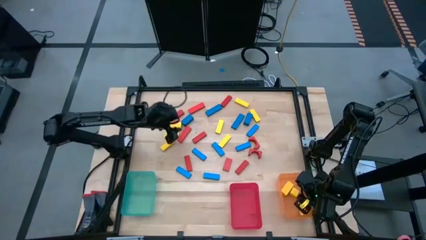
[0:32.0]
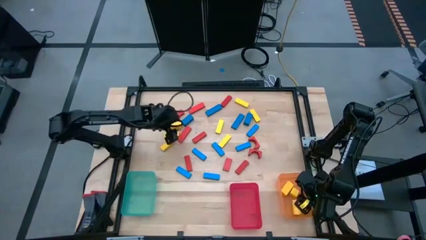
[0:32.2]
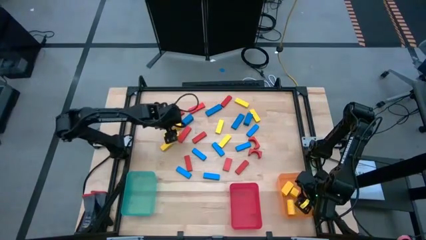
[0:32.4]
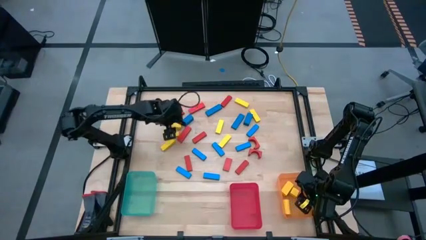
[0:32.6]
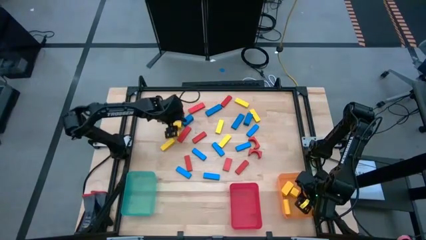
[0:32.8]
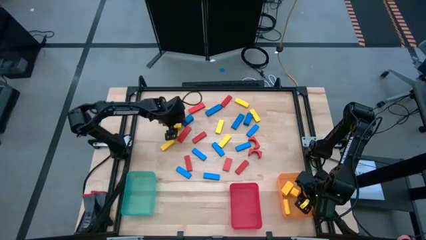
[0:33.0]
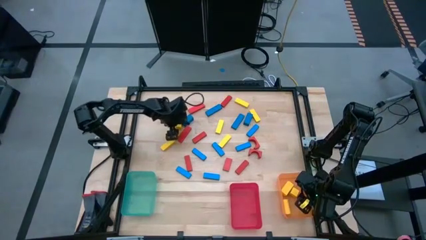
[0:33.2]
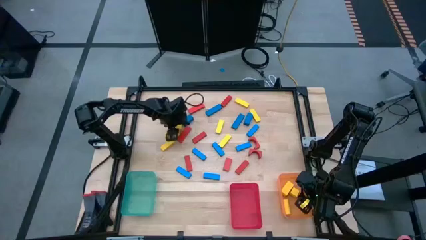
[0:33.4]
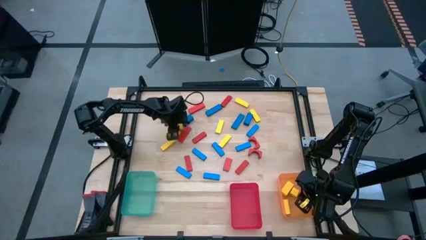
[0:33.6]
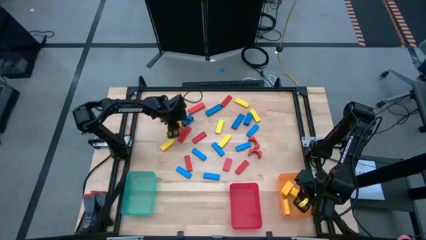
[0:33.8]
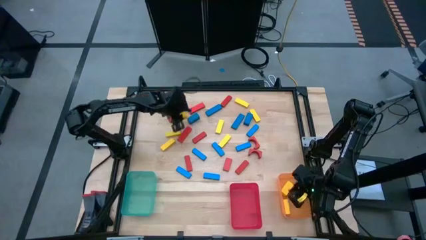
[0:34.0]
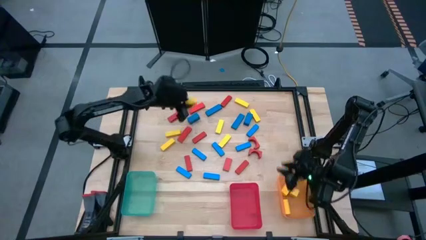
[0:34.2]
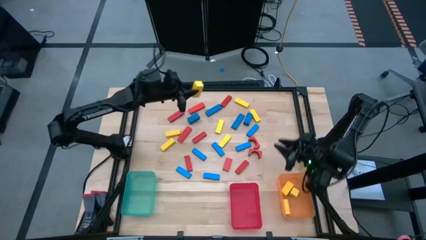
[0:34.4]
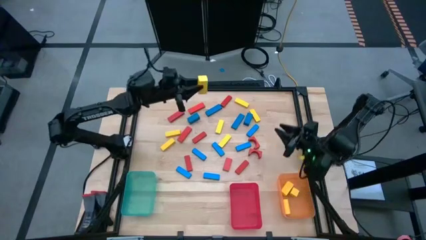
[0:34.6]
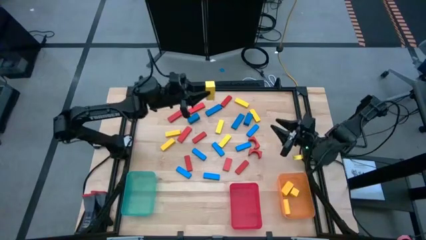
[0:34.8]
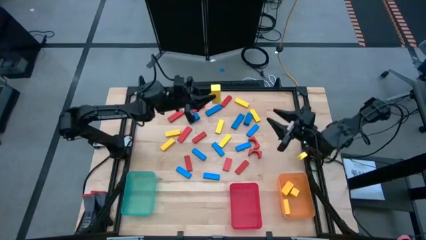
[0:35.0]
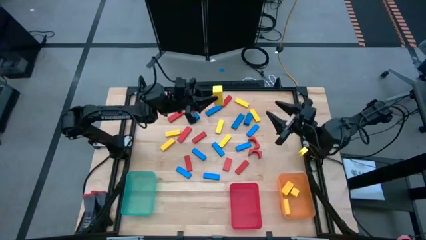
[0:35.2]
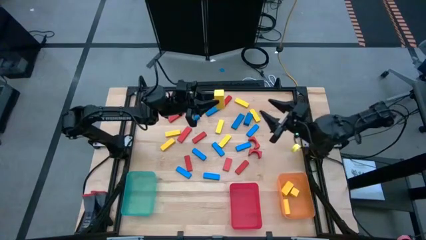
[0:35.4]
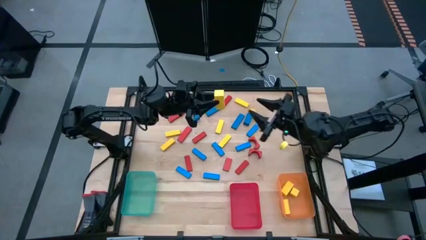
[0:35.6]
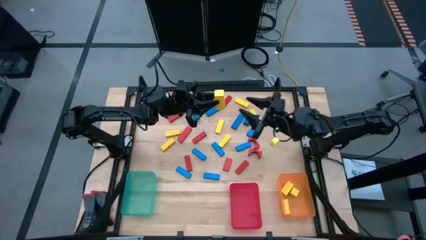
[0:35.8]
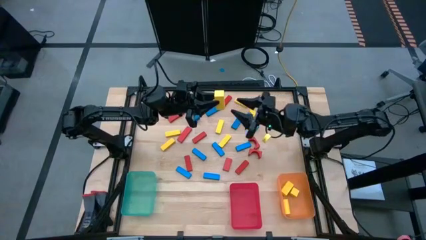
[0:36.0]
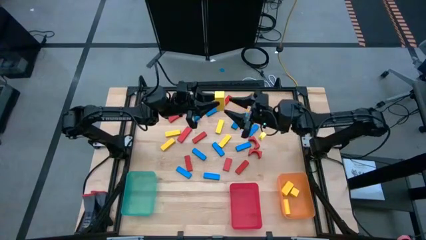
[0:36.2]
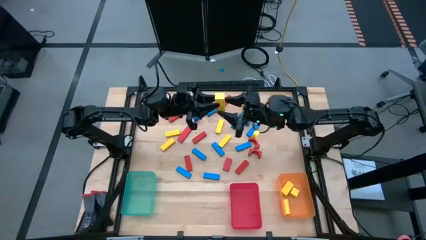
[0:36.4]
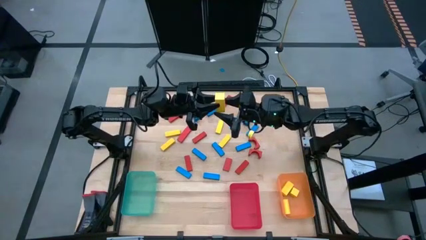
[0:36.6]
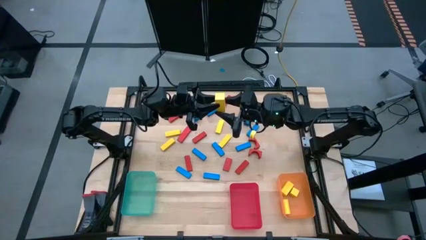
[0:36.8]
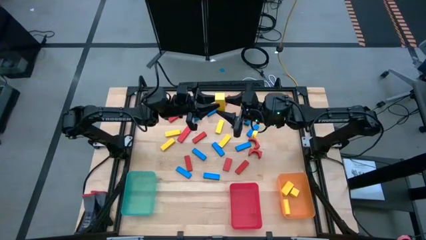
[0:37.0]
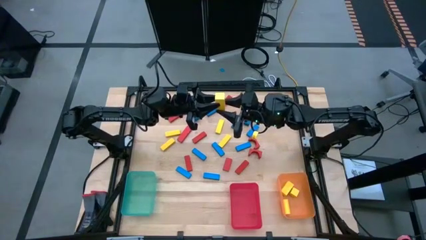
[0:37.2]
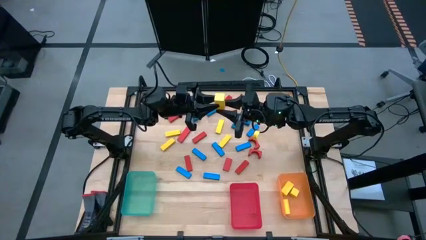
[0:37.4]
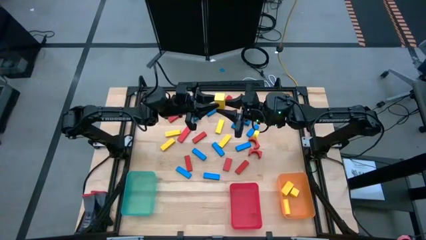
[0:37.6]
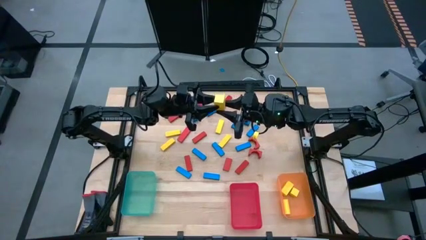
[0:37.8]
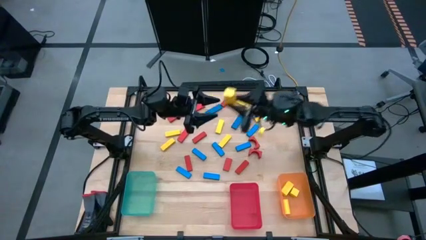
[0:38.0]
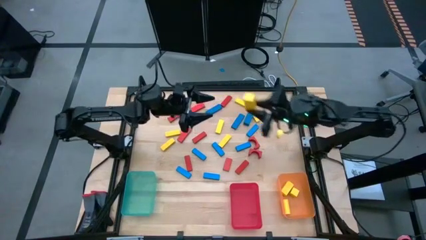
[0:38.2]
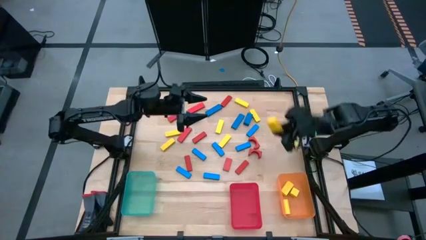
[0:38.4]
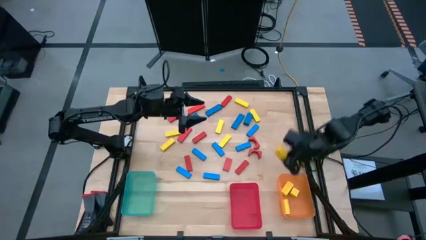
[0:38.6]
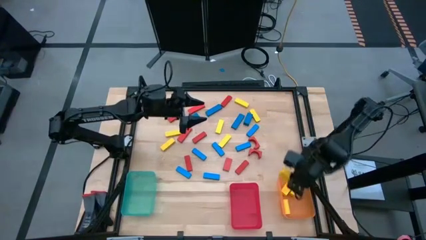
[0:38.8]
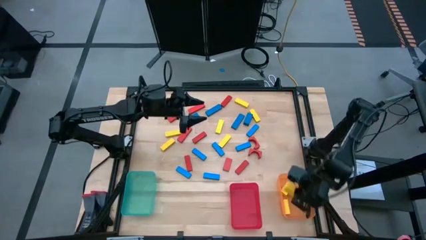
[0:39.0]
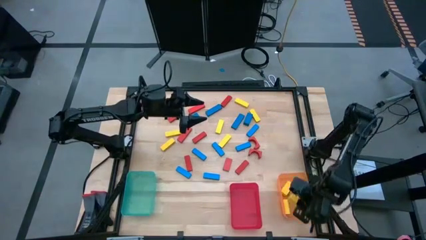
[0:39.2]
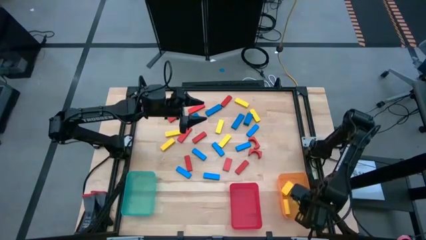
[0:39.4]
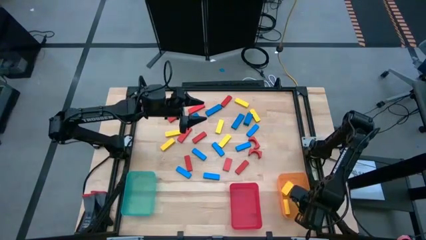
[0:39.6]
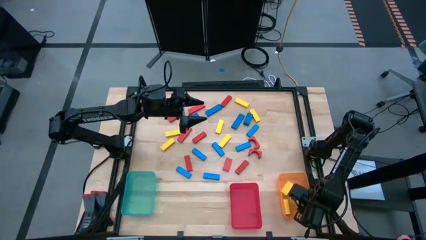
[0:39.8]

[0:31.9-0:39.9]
Task: Sort blocks
Put the yellow block into the orange bin

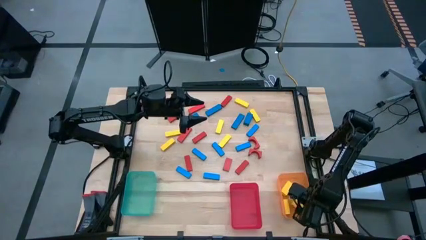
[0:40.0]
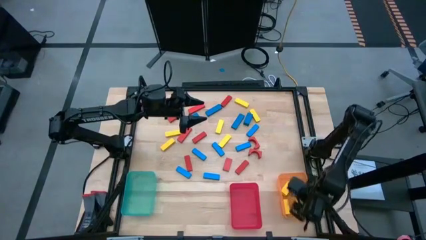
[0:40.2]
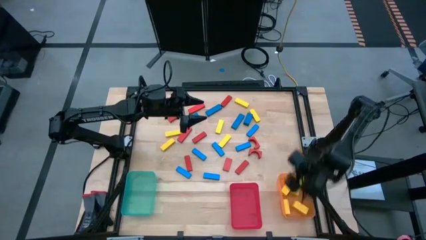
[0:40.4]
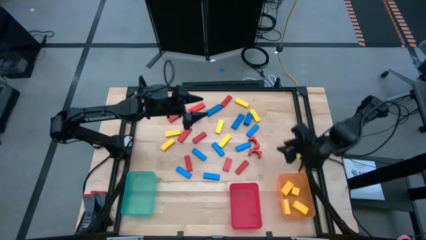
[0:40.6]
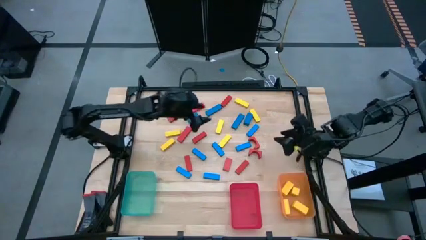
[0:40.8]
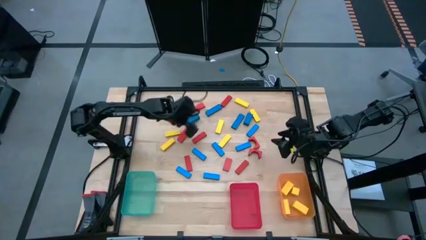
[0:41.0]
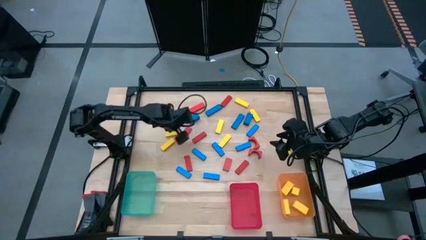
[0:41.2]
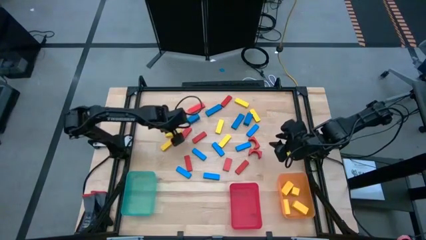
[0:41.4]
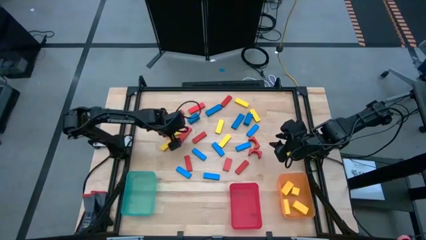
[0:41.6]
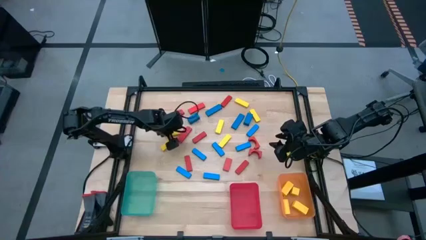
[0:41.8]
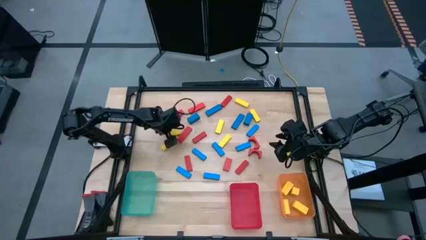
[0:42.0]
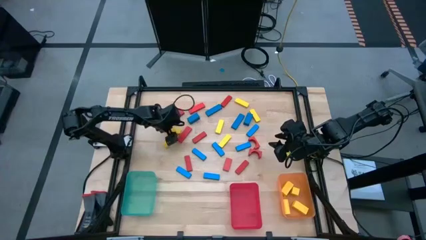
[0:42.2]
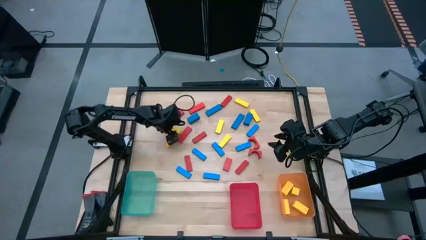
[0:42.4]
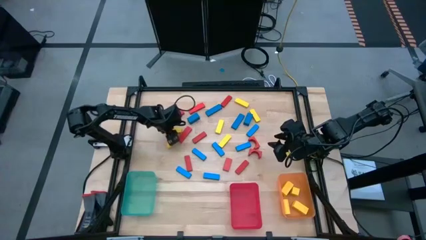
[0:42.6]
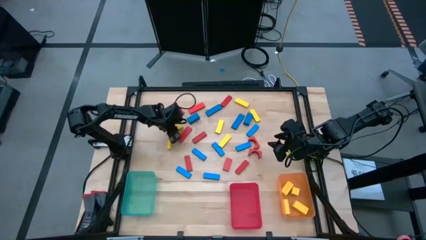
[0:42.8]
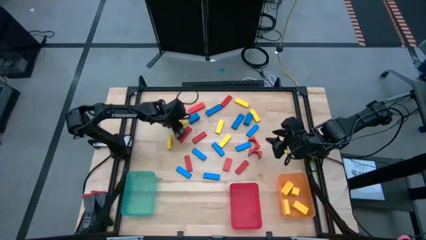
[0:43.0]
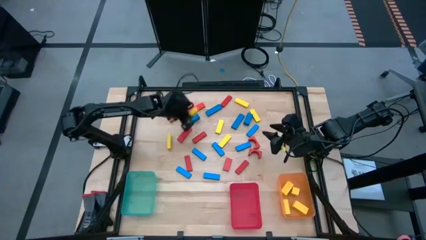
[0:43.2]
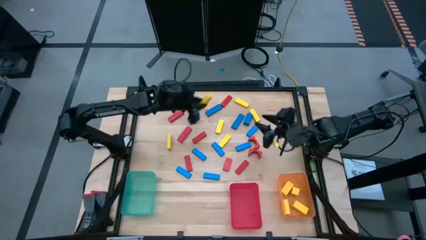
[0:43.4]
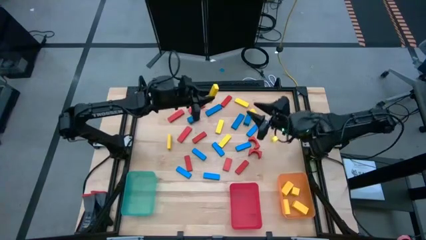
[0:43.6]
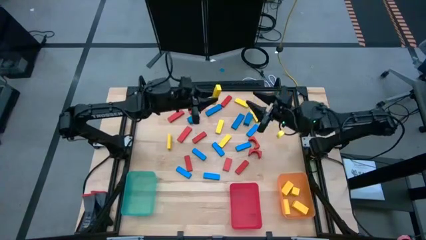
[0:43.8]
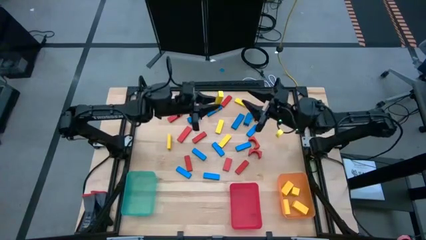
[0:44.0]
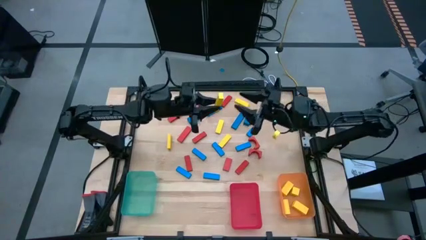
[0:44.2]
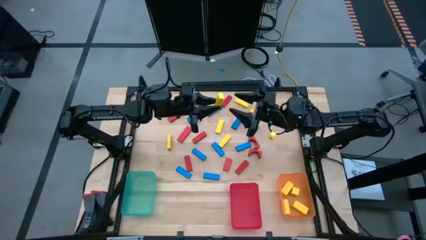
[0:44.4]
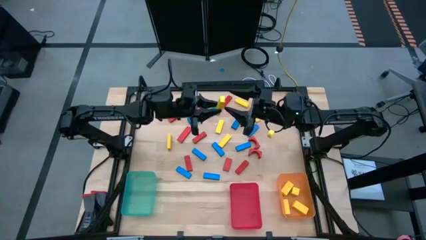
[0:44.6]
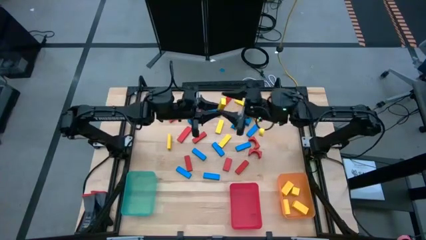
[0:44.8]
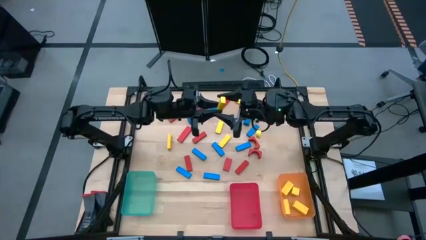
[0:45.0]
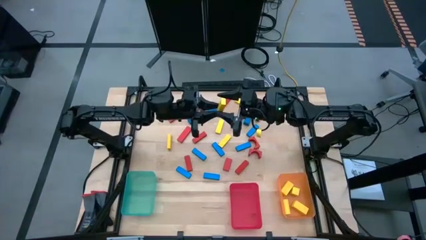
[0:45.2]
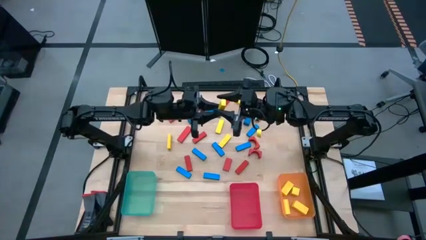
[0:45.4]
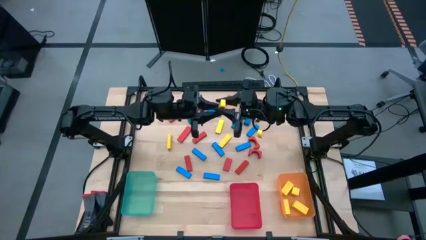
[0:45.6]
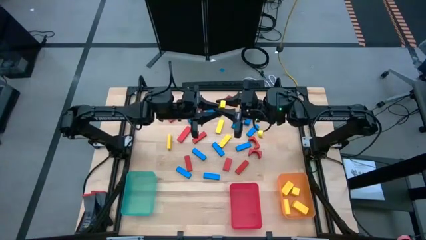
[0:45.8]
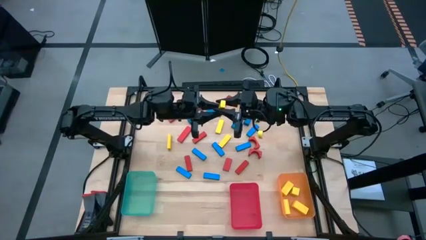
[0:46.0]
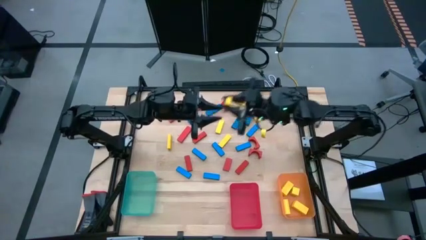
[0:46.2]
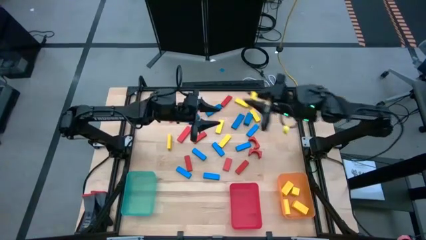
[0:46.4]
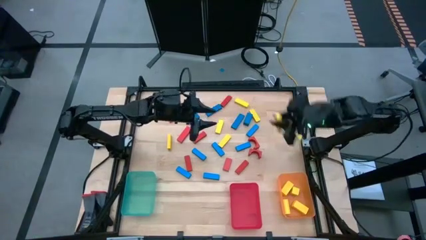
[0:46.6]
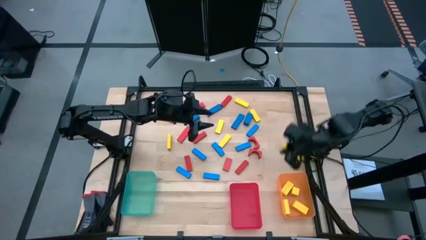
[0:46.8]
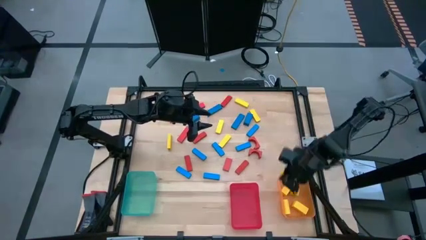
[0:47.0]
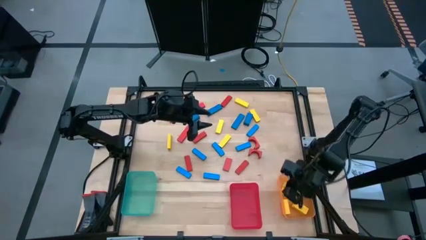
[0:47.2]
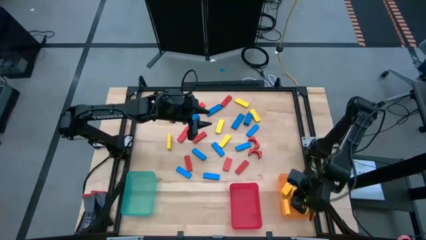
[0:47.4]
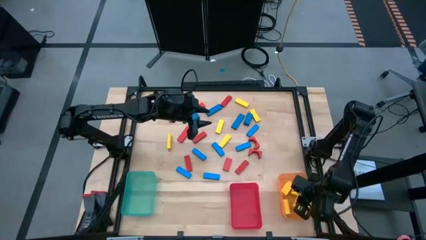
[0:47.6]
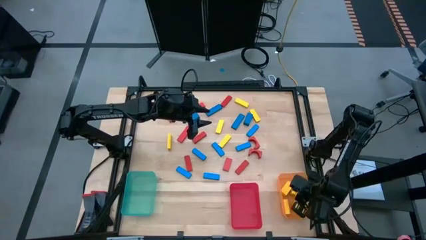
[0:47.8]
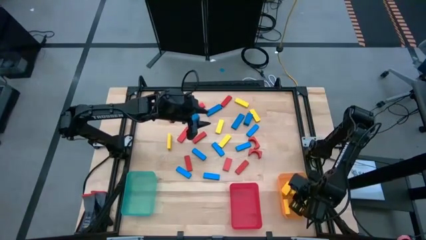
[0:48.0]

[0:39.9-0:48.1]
Put the yellow block into the orange bin
